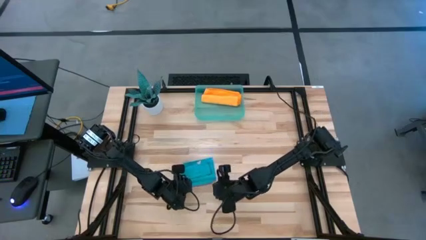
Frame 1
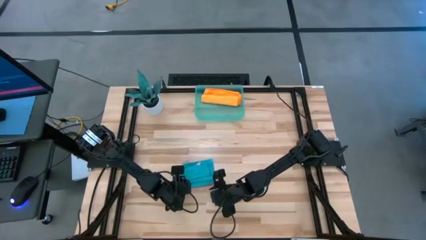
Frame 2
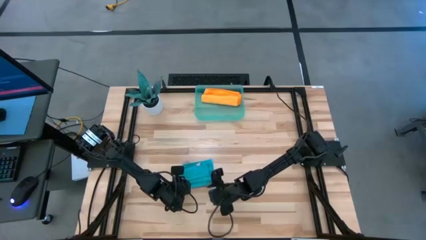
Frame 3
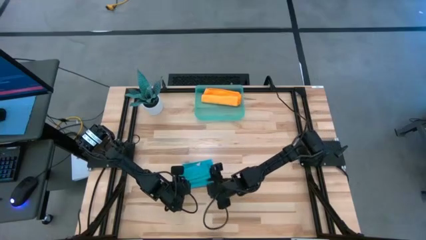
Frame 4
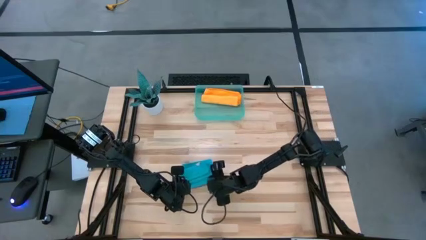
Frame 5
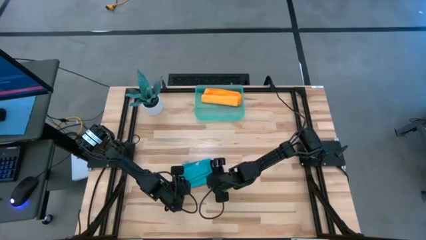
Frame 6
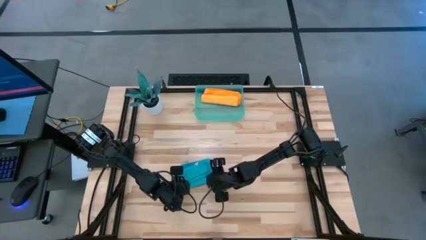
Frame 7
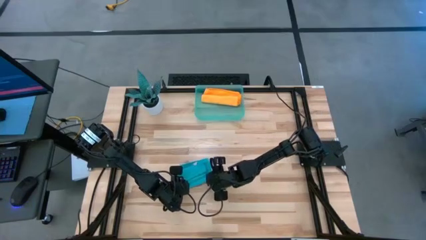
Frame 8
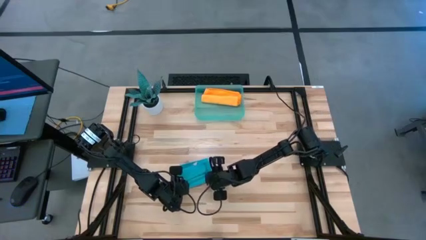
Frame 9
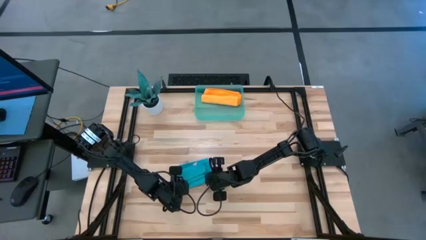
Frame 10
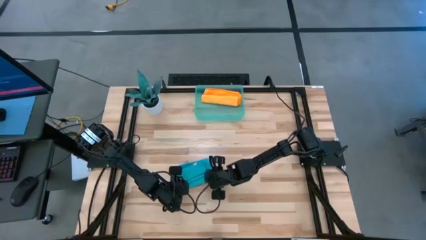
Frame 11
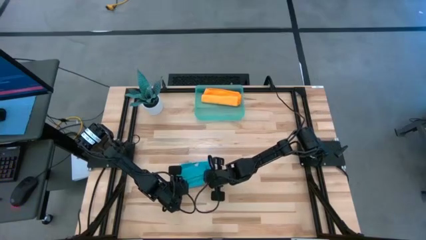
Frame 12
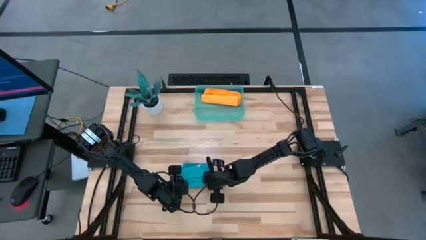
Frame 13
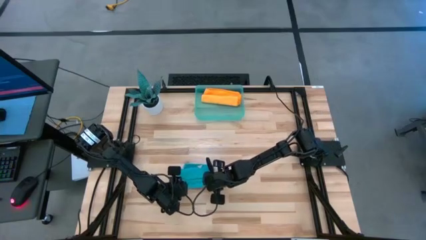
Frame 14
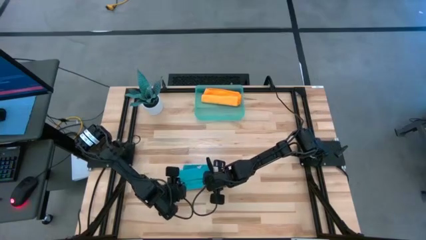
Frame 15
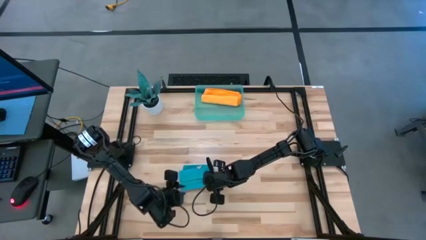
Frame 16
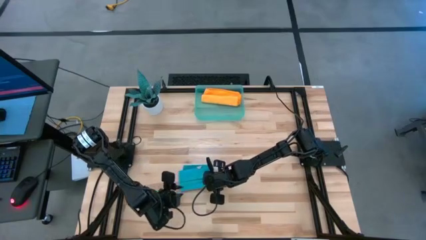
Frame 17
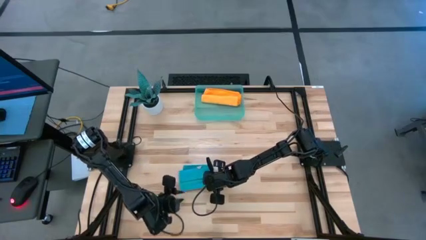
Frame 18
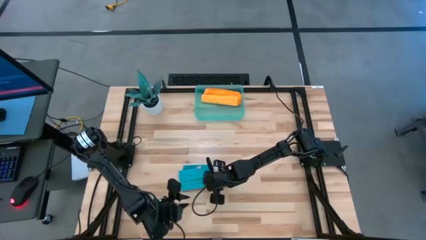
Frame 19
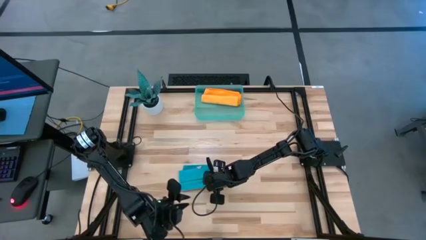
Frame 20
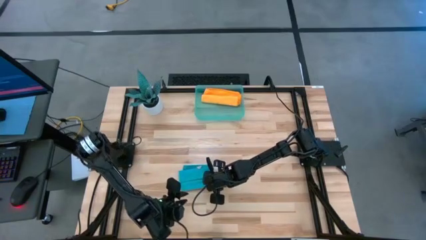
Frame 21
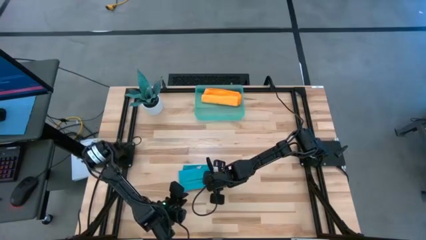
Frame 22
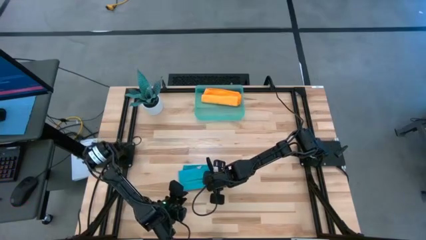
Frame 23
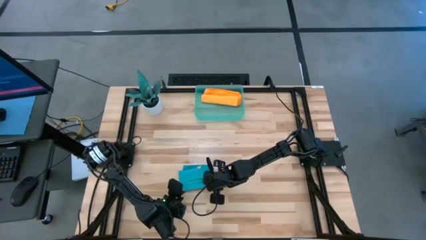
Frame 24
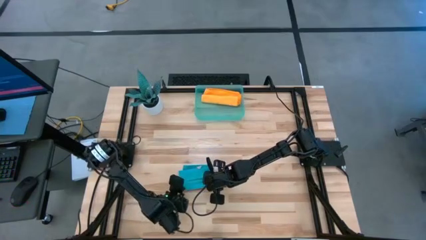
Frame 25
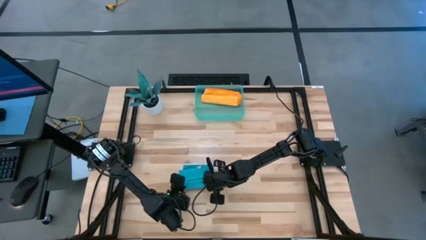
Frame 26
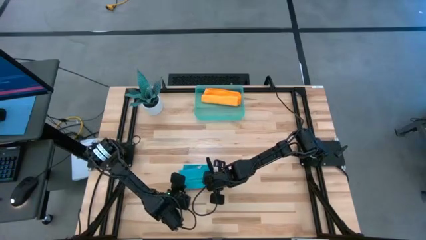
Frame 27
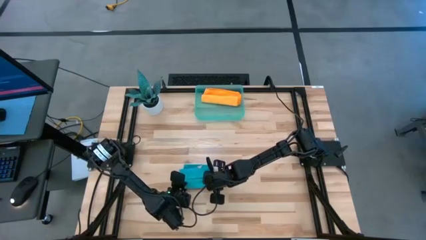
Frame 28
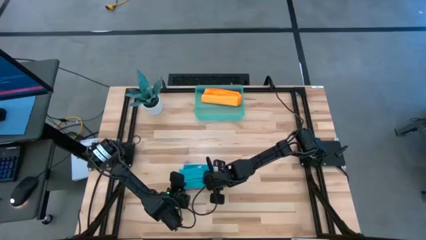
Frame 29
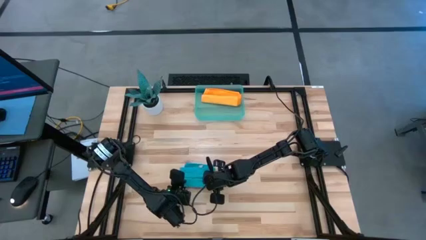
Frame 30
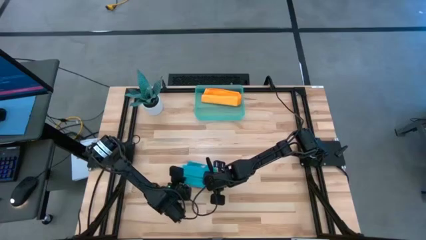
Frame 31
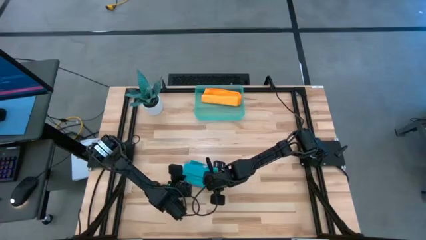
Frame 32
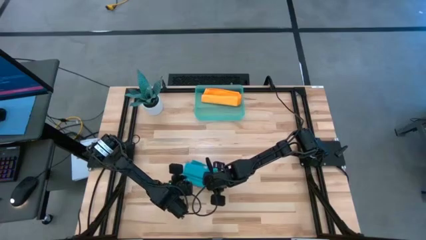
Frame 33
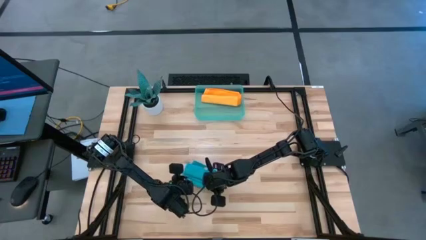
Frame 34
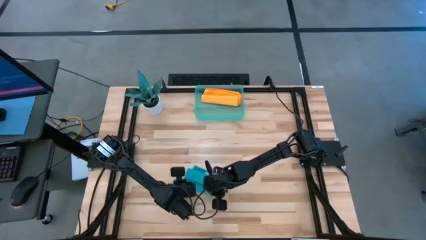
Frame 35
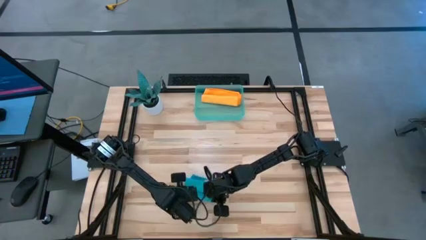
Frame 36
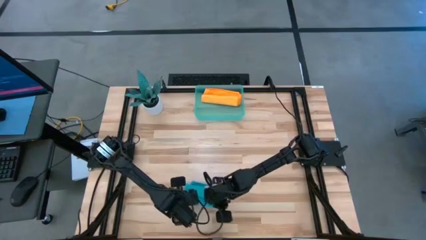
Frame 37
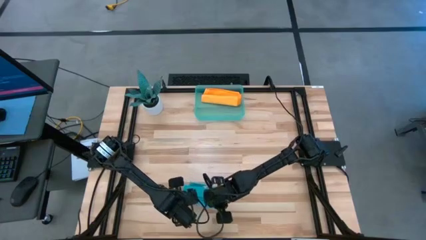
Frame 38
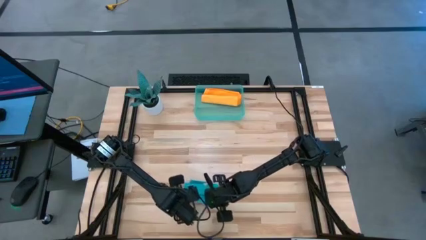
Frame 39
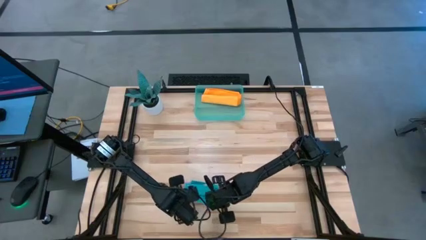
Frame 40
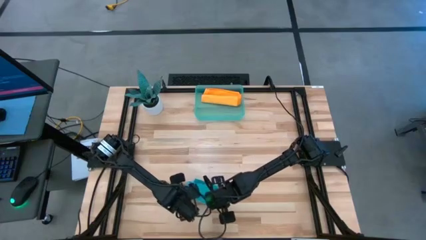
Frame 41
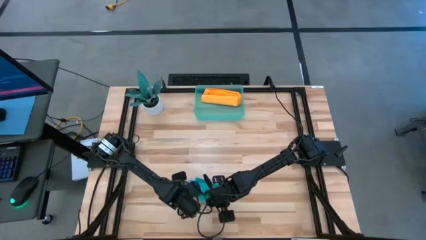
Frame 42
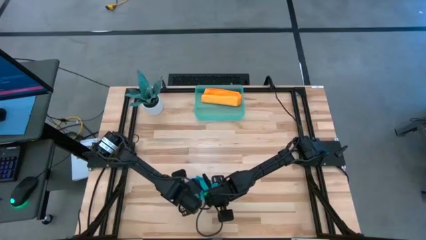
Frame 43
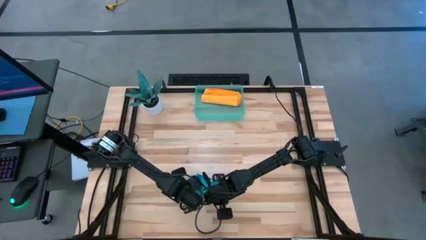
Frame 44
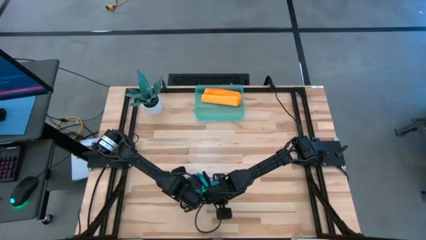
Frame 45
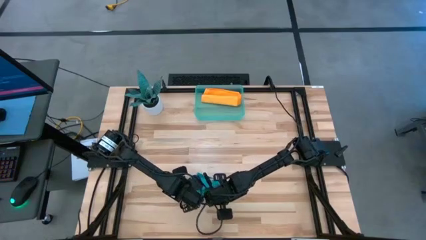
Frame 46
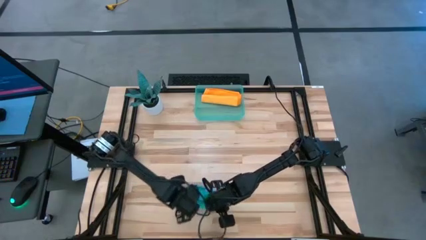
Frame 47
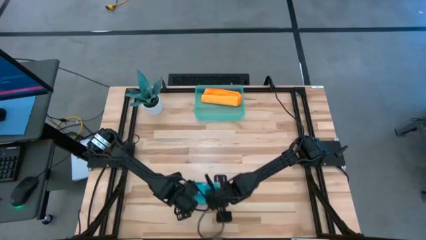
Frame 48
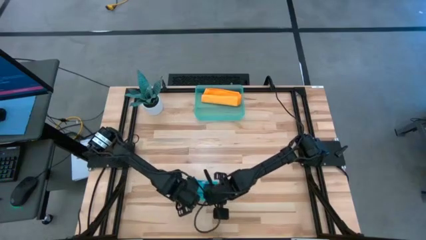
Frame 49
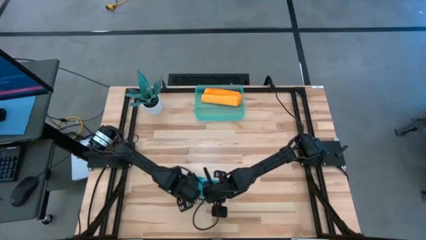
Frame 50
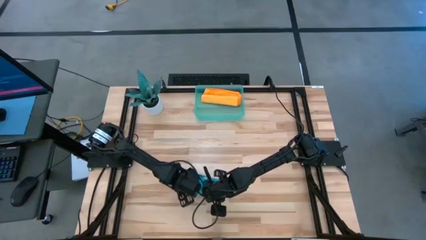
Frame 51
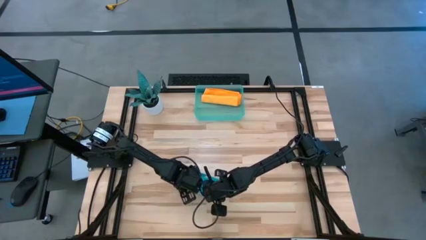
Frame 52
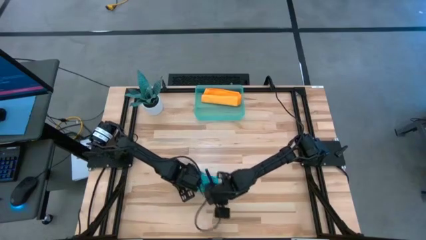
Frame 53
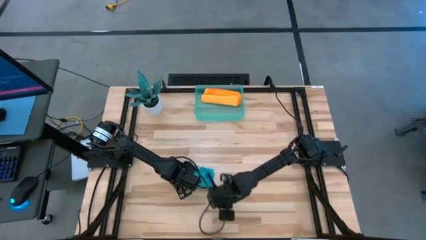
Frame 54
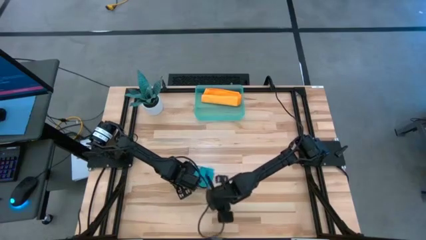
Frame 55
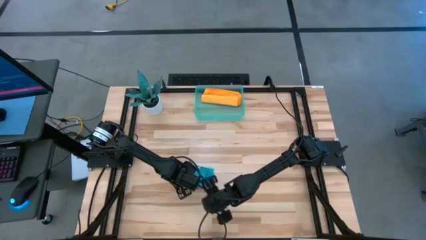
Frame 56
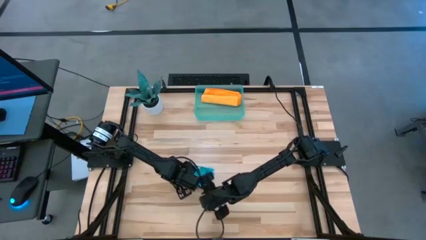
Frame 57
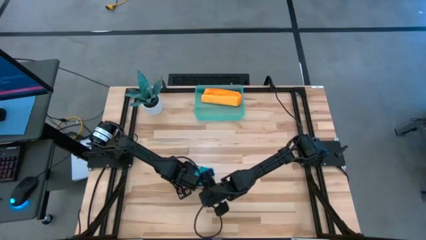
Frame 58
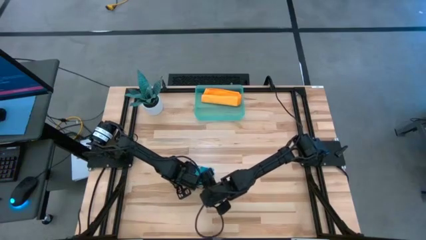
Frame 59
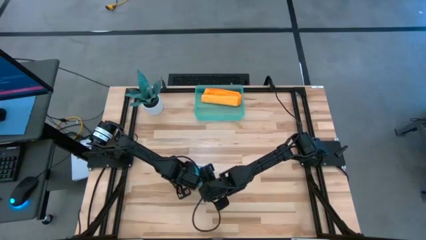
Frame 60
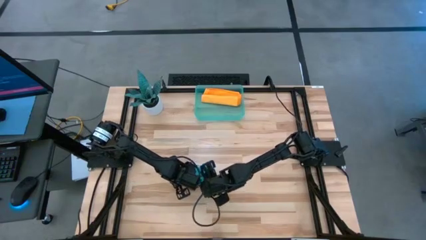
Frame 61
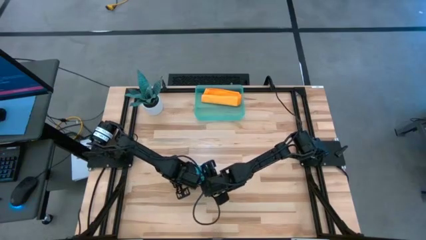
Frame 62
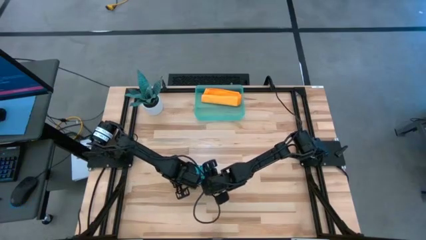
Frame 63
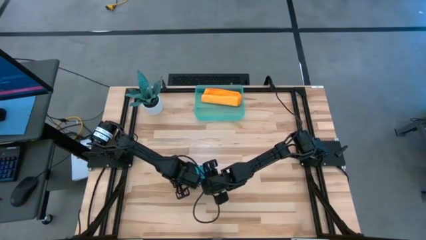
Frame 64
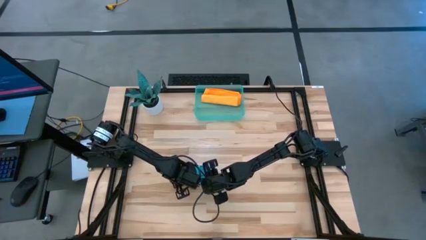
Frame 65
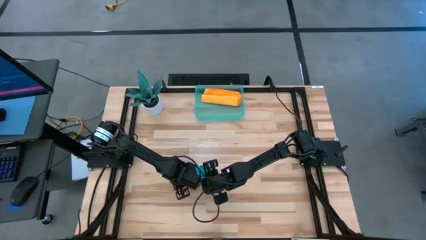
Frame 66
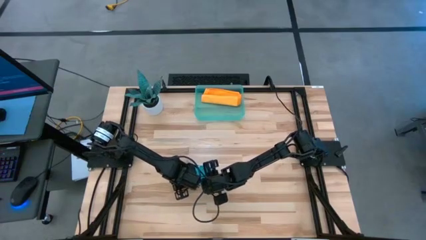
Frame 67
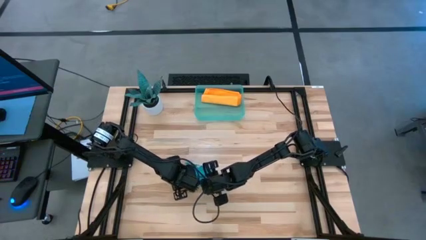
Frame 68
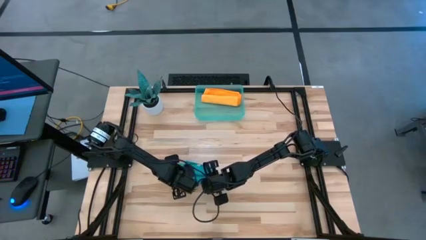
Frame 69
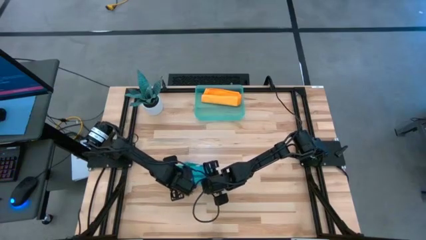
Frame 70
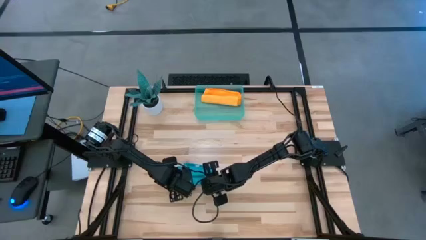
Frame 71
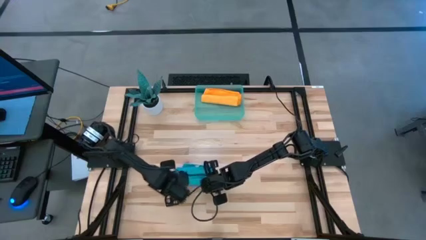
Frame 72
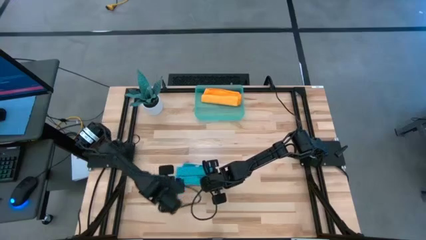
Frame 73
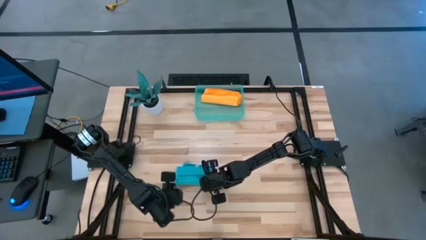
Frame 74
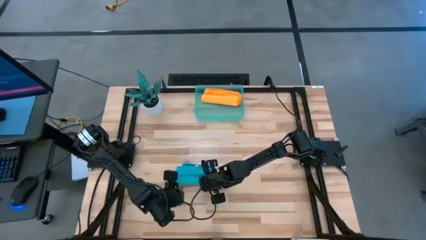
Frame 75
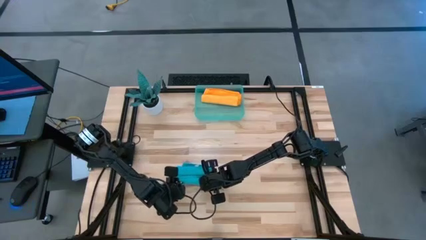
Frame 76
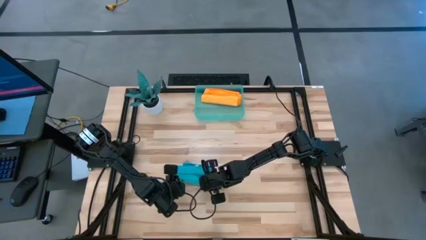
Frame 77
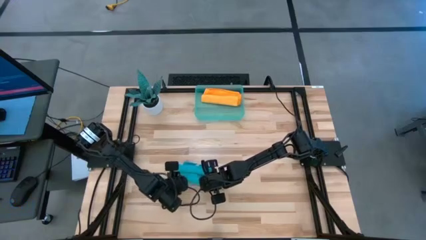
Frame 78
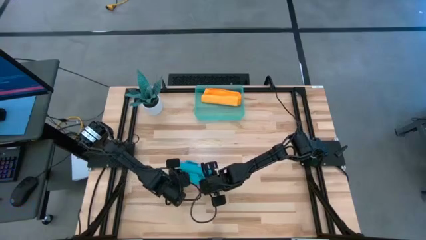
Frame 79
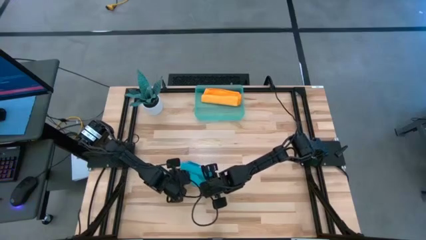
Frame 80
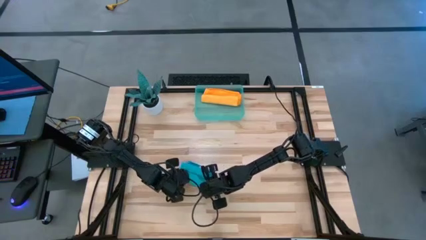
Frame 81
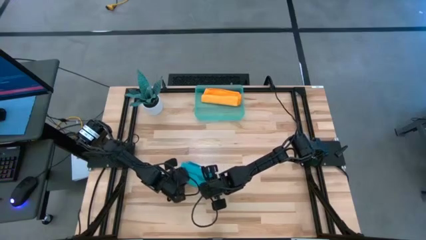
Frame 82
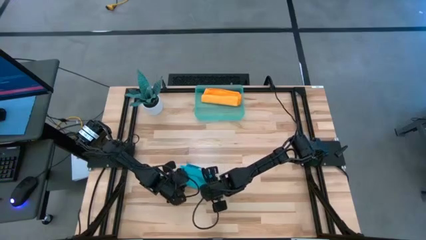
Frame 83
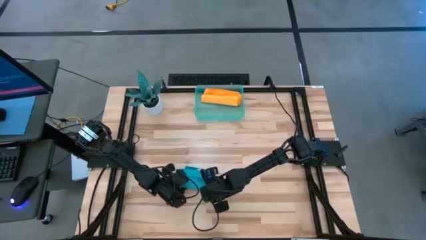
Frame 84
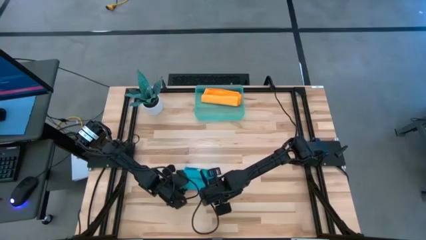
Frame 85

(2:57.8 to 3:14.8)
Task: Roll microfiber towels into tight, uniform cylinder then place into a basket
Roll the blue microfiber cloth
